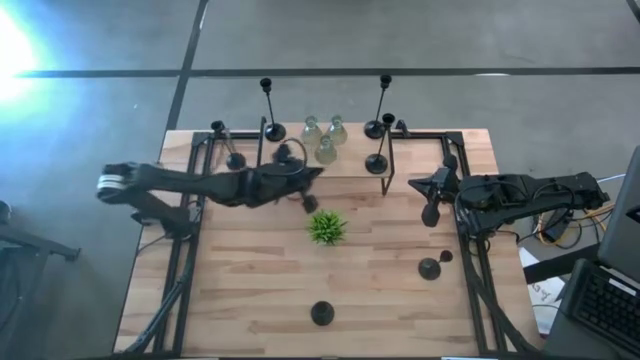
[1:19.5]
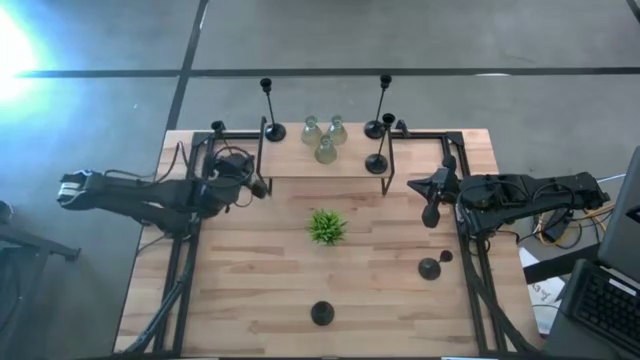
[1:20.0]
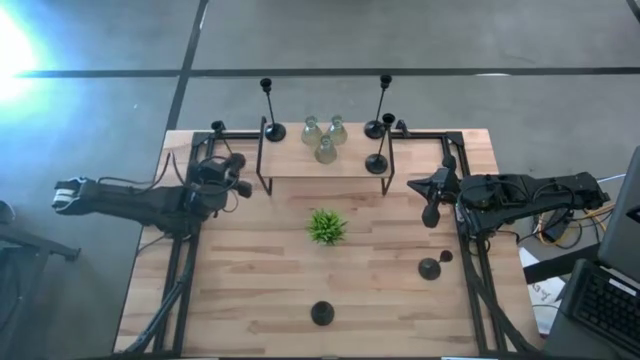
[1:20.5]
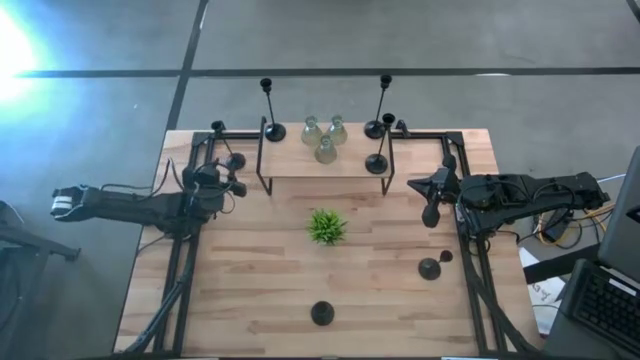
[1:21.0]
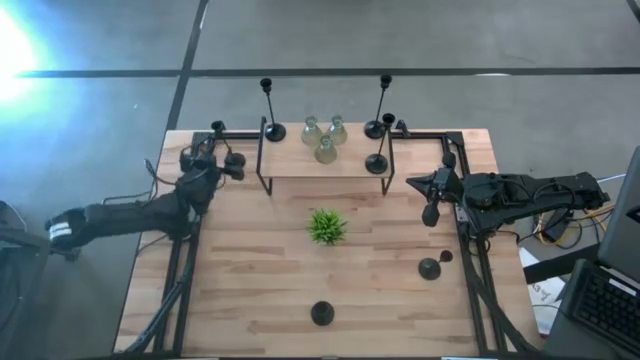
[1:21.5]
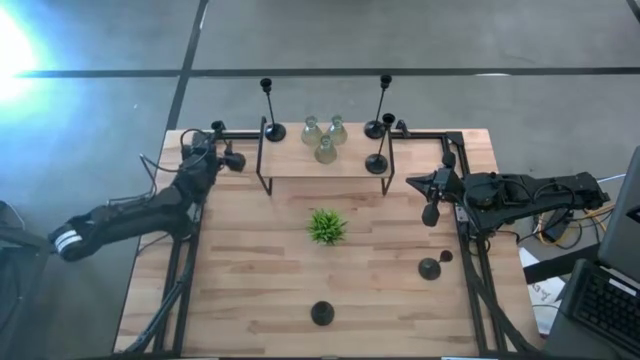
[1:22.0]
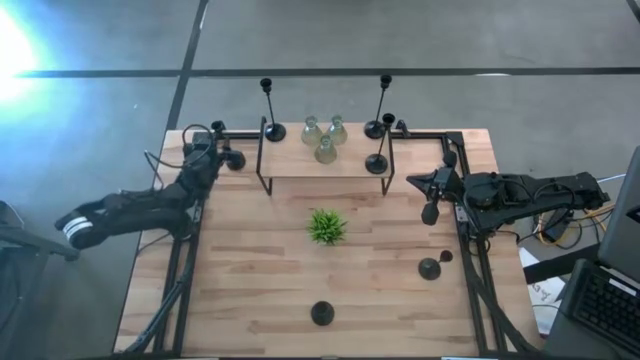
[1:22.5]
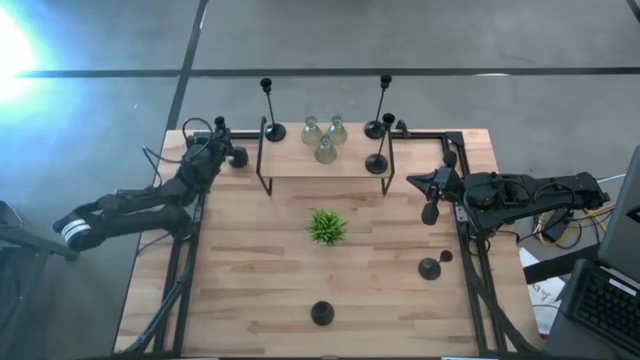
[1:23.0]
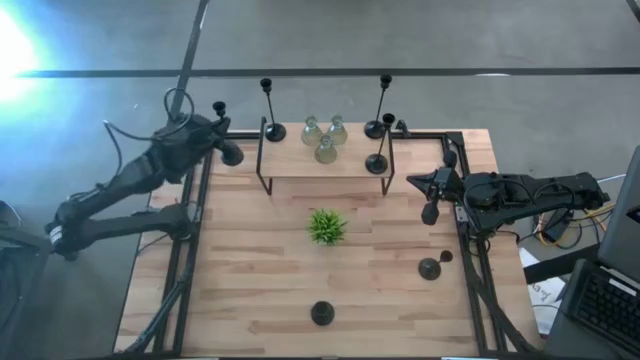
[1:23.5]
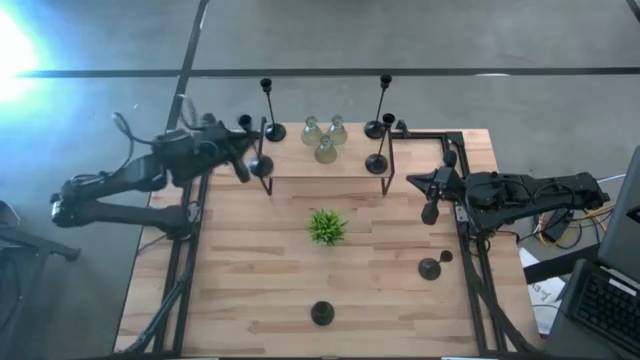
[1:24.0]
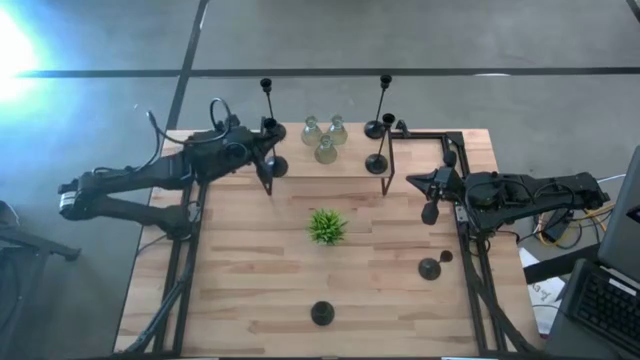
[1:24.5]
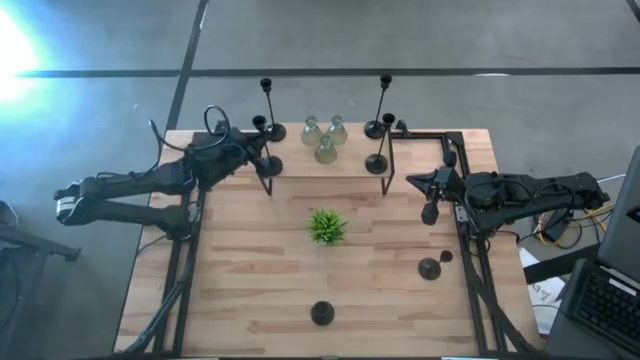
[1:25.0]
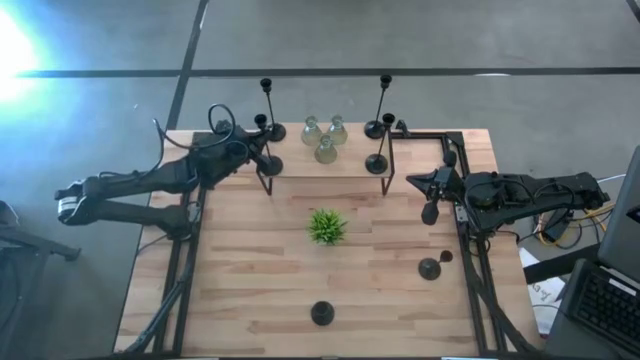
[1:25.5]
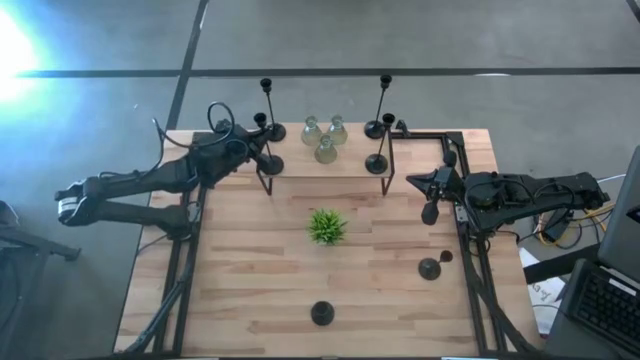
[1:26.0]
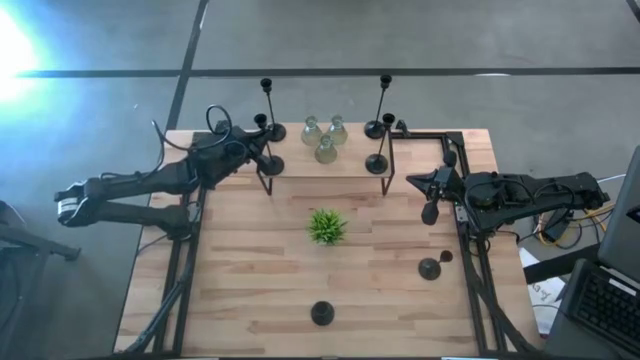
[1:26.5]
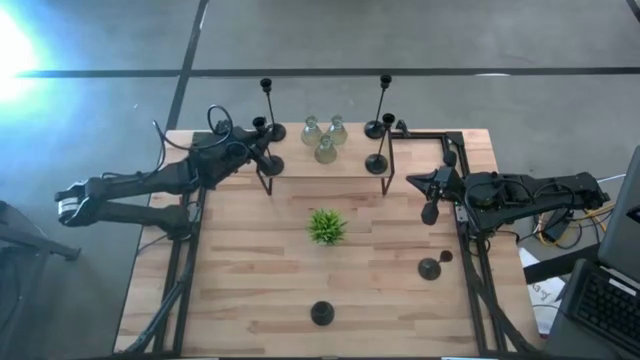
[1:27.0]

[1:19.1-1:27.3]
Task: Pick & Place candle stick holders
Align the black candlestick holder with the black candlestick holder on the shelf

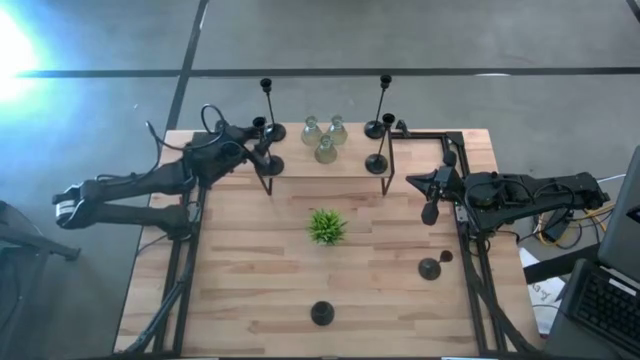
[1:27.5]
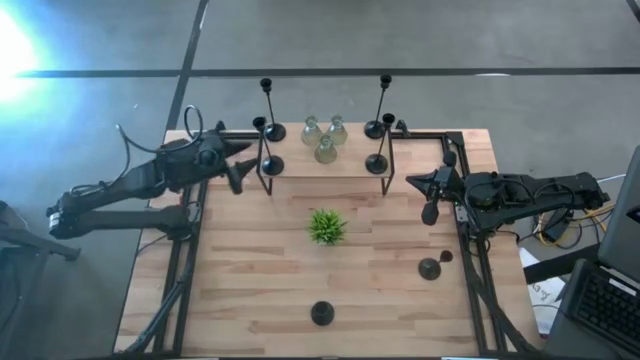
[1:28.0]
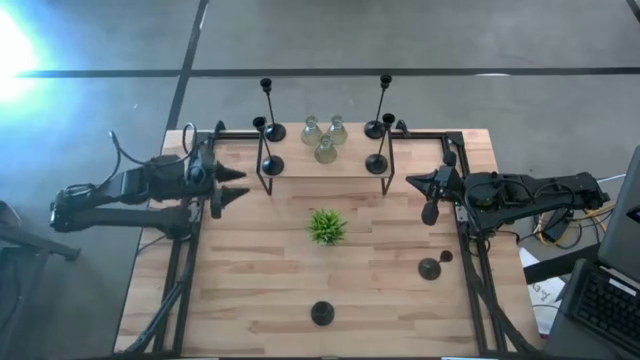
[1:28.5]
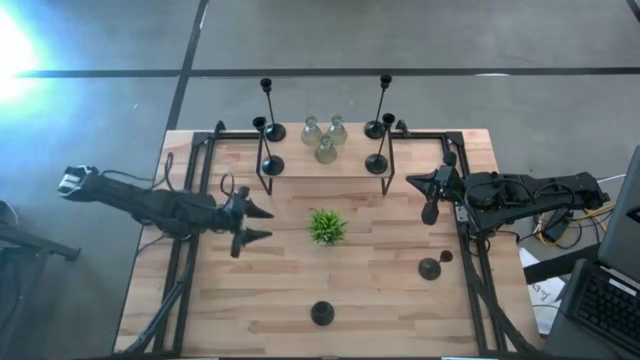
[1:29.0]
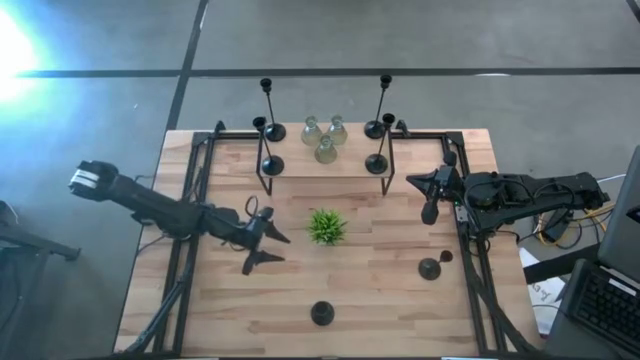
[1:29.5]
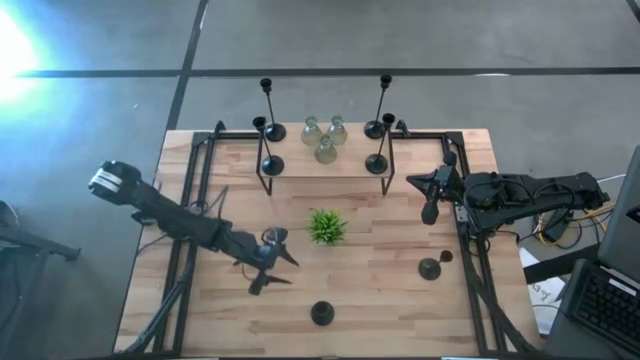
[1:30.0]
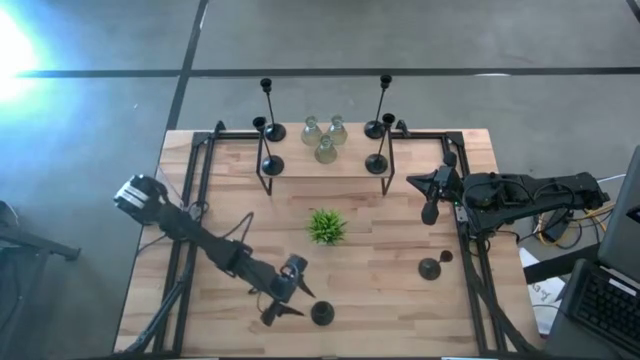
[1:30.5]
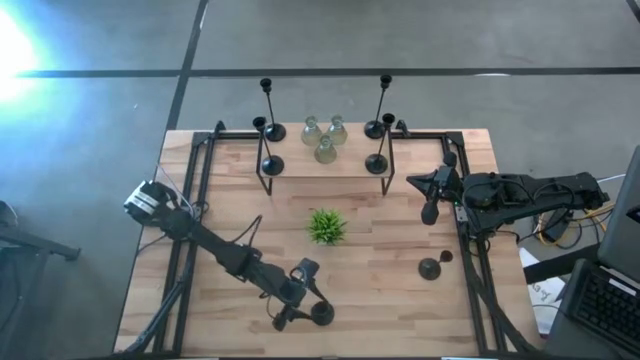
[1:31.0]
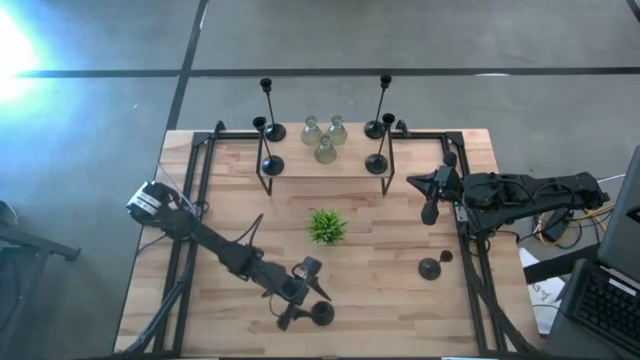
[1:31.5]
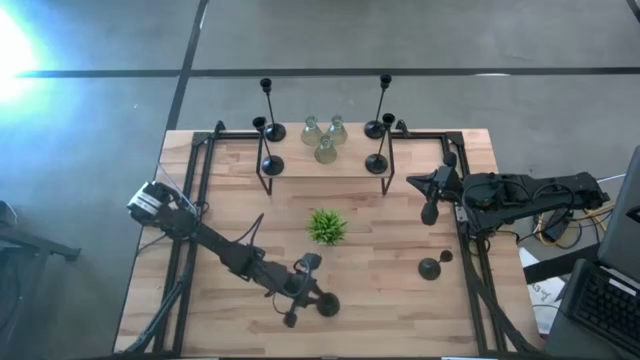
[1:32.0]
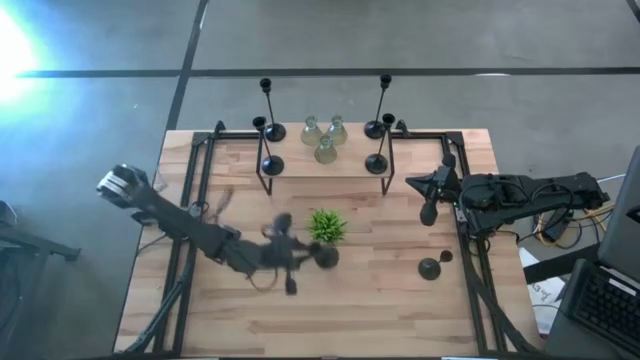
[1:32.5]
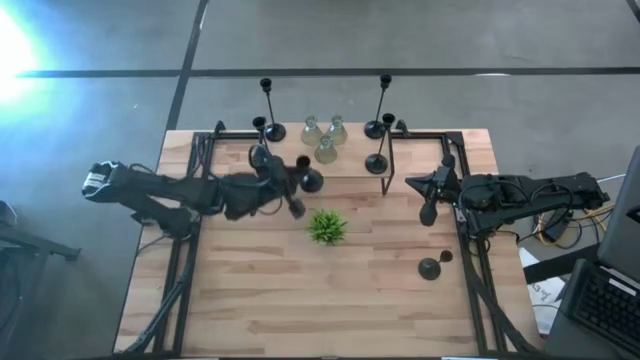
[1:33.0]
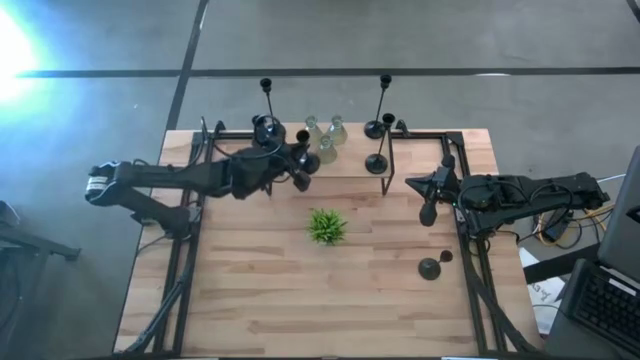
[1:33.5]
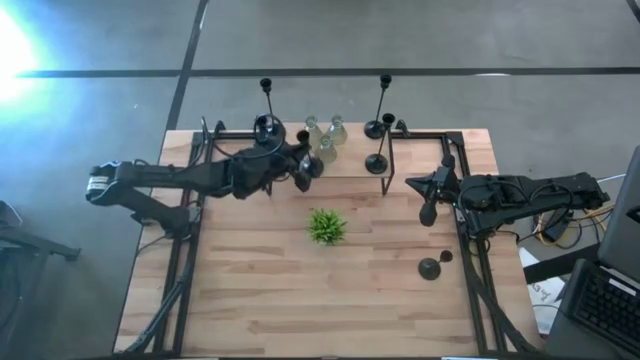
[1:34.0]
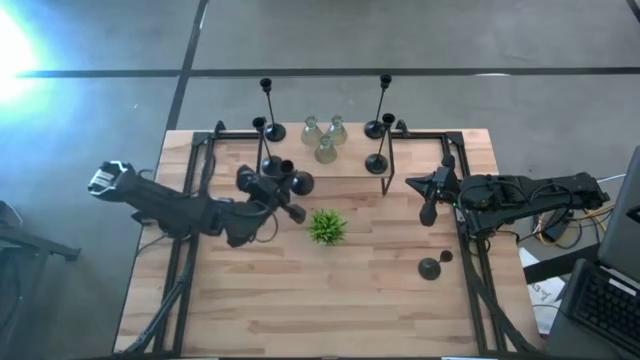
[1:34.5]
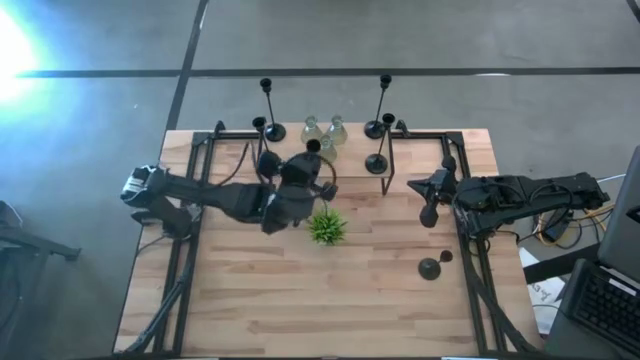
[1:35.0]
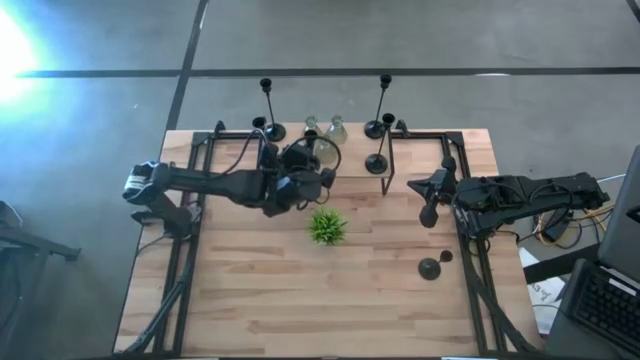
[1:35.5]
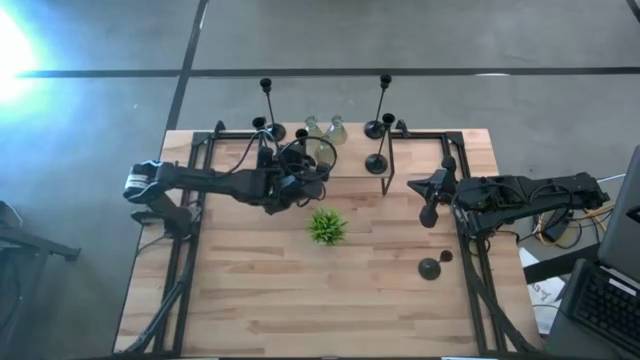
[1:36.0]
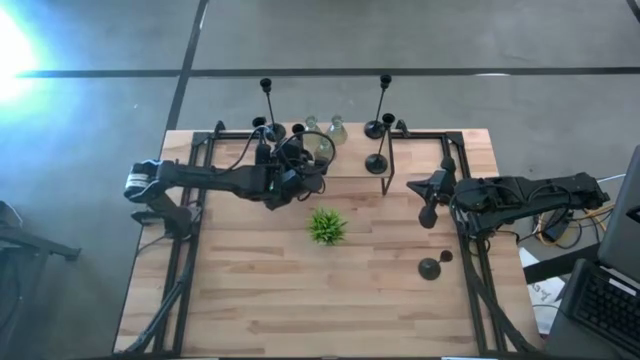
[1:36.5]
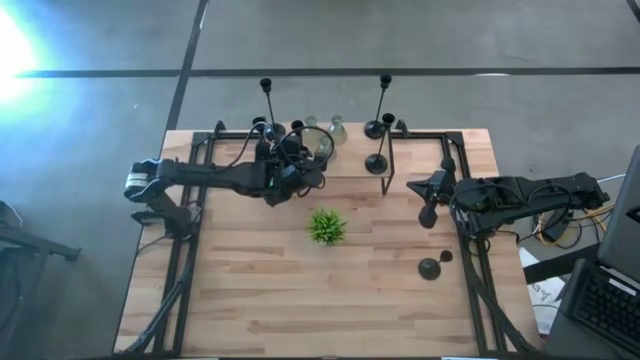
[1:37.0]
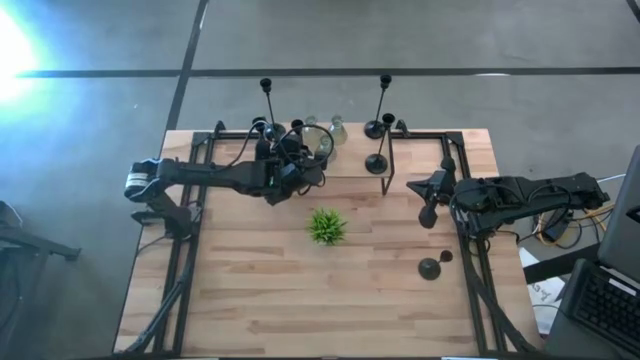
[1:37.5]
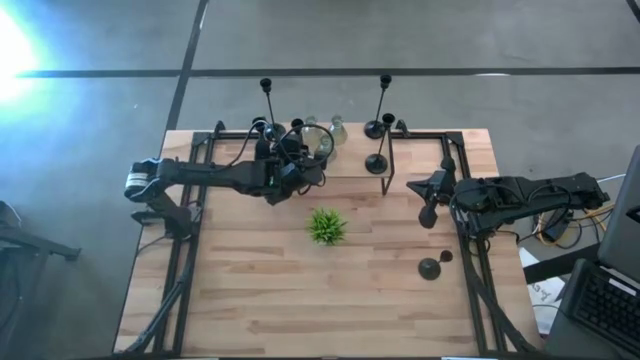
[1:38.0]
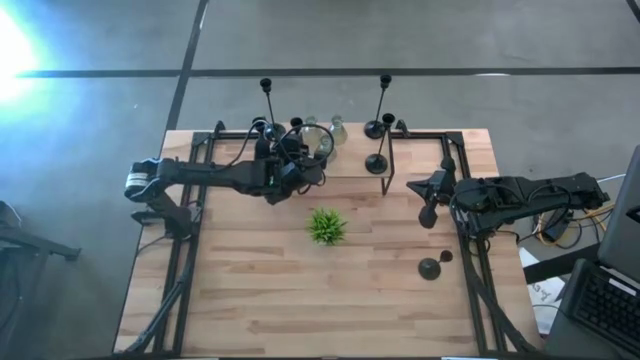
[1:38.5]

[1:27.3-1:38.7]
Put the black candlestick holder on the shelf
